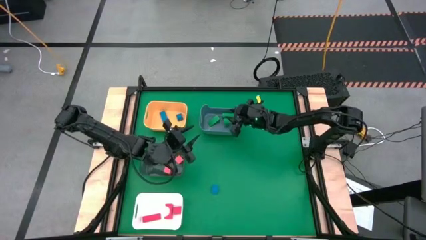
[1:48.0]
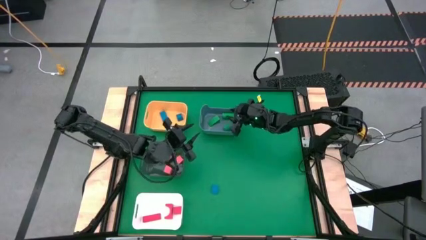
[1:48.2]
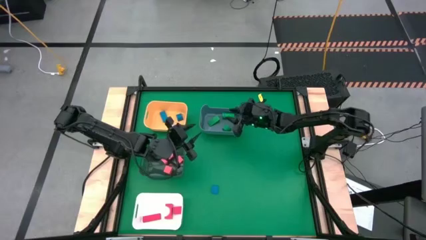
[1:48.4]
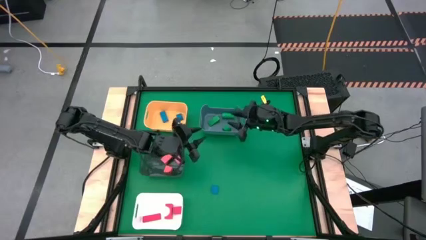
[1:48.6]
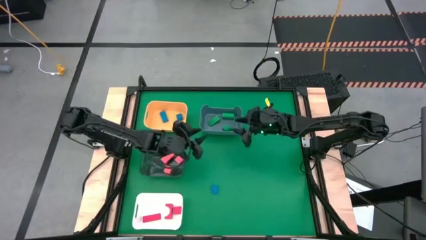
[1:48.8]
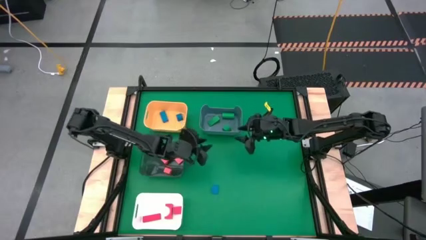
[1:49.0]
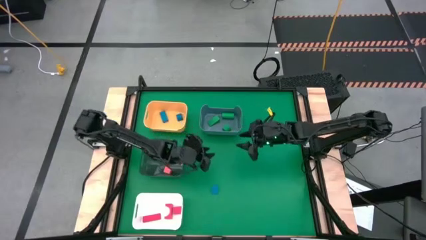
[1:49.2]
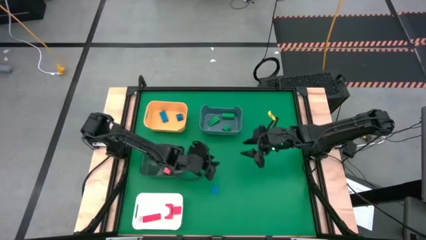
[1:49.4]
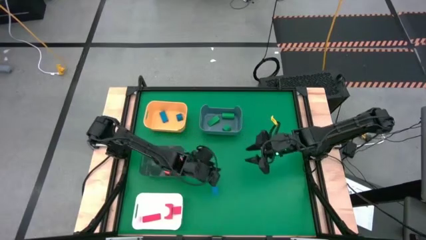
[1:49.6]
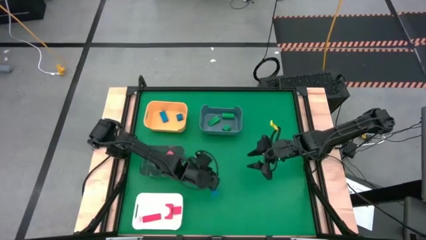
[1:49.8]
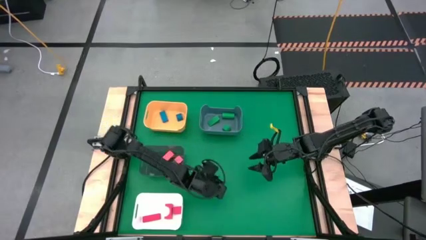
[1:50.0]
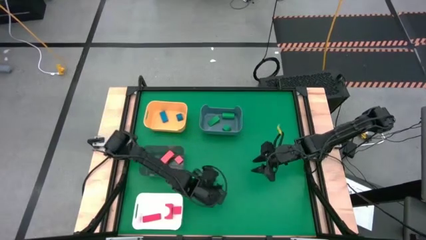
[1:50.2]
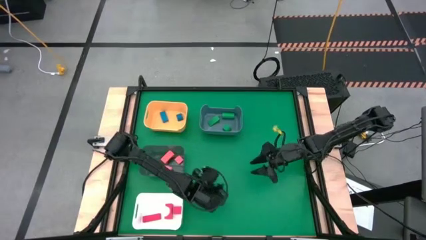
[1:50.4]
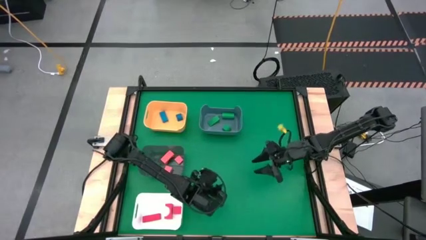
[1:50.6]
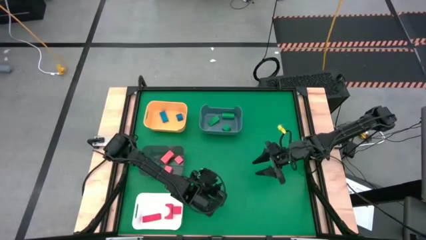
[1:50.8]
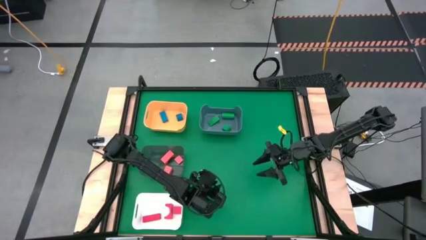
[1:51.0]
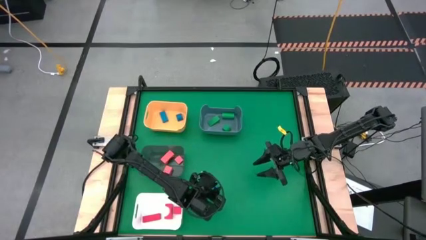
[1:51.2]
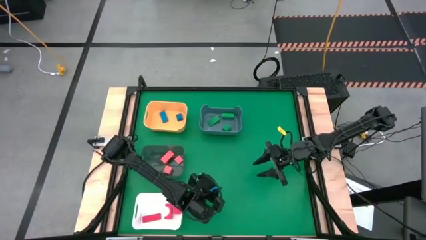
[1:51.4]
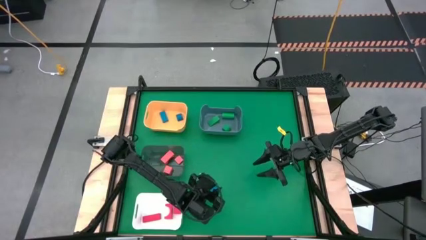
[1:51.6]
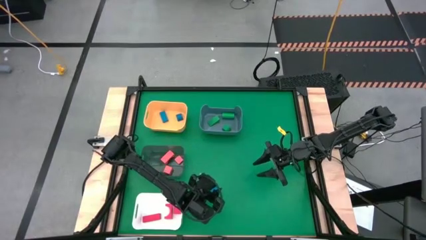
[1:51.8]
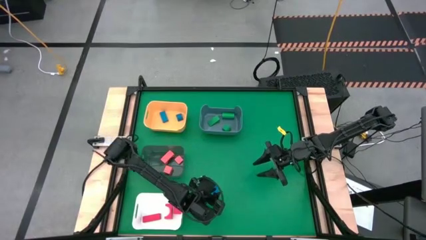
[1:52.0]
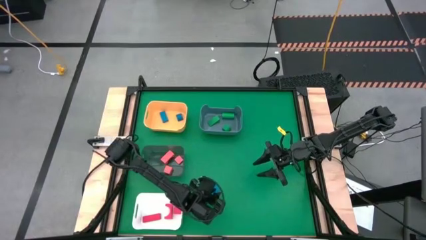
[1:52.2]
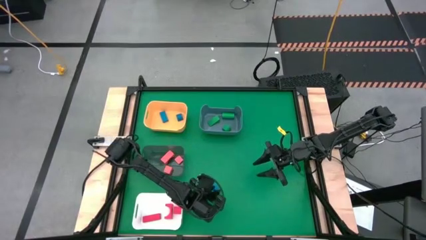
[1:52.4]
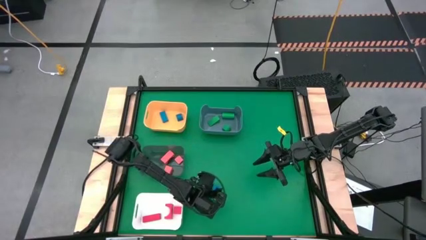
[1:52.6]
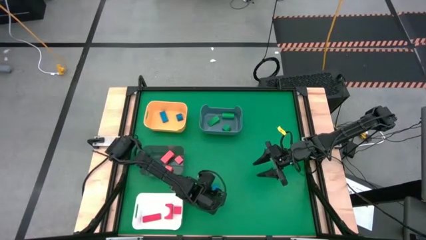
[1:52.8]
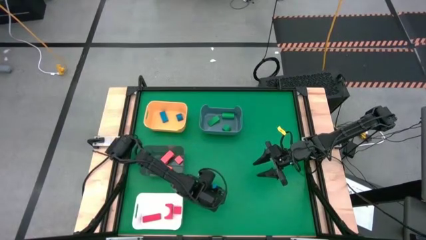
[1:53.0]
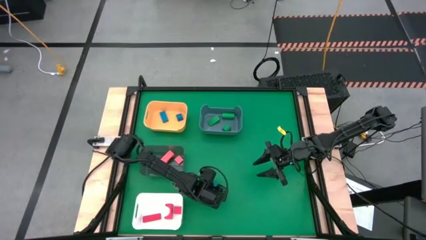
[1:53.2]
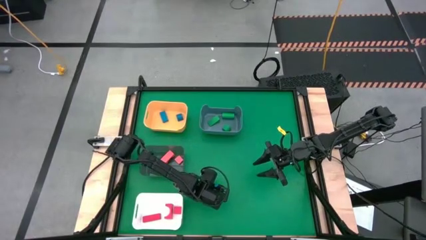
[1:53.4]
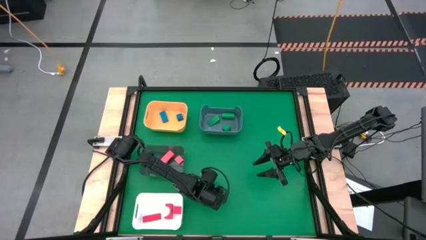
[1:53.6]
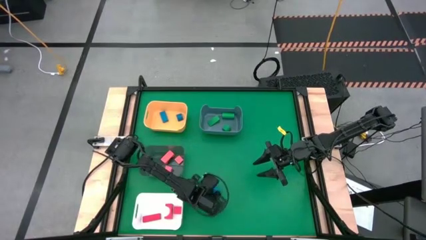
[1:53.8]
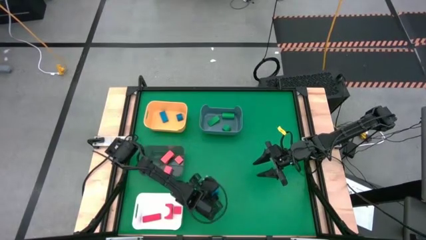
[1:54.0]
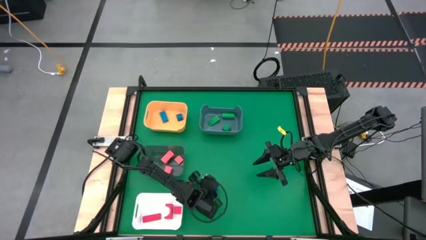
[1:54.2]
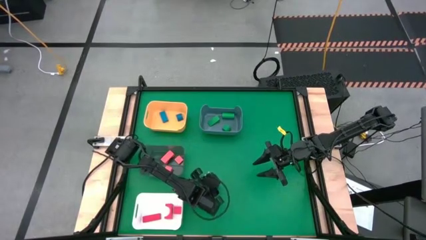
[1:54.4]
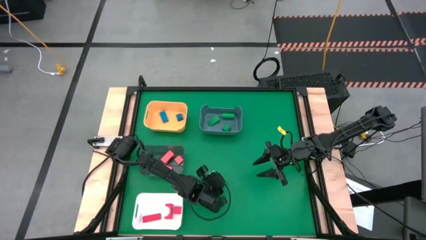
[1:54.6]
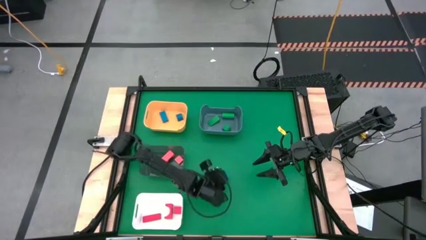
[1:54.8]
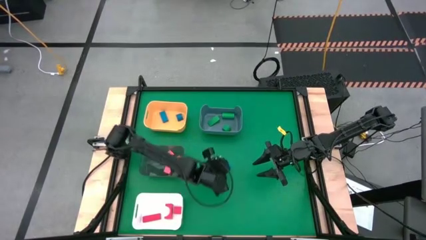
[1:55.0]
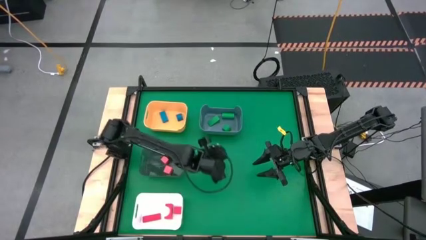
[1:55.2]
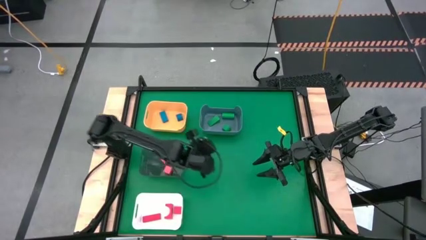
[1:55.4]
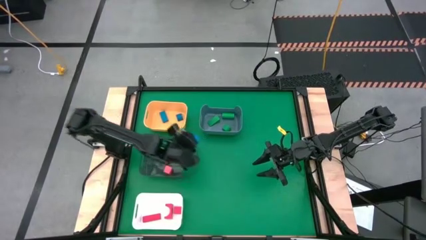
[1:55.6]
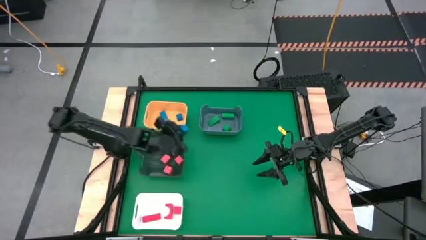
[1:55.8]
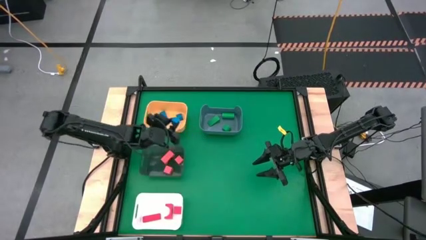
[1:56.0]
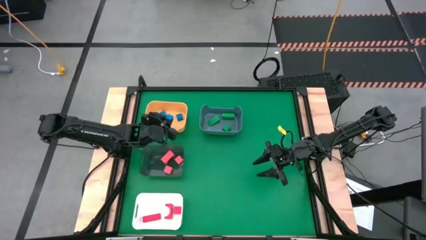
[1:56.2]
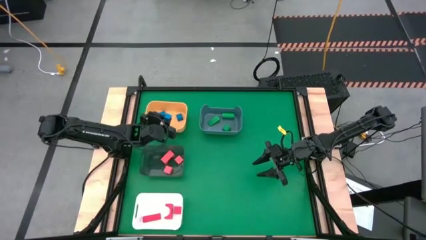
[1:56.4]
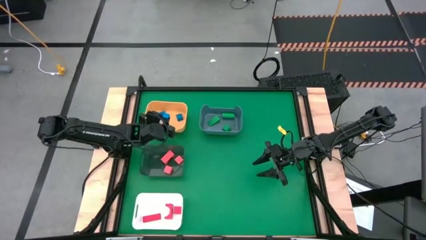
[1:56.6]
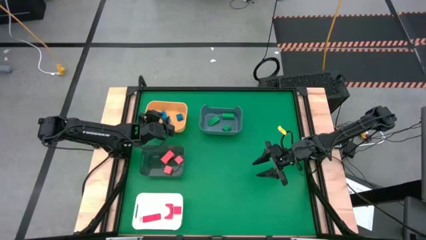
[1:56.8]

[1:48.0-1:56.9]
Task: Sort & place blocks by color
Put the blue triangular block into the yellow bin

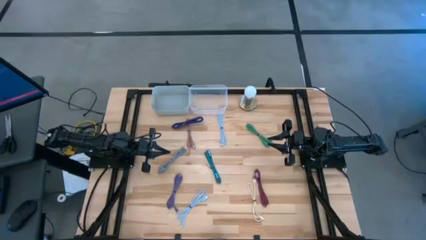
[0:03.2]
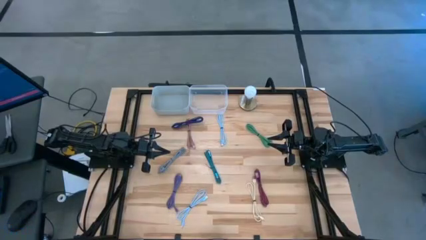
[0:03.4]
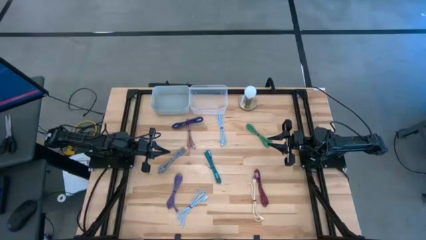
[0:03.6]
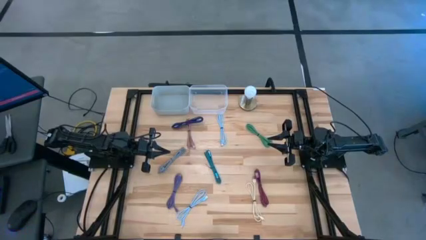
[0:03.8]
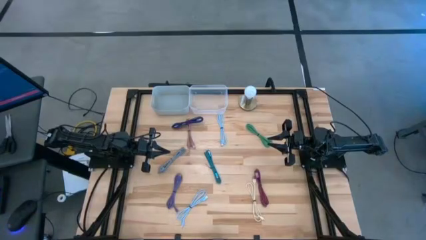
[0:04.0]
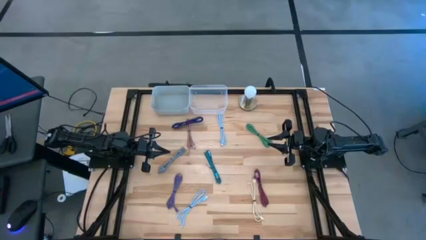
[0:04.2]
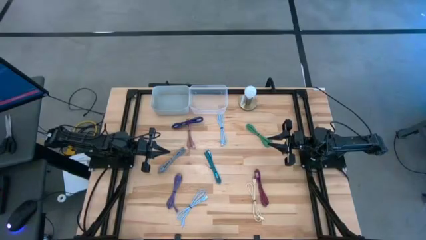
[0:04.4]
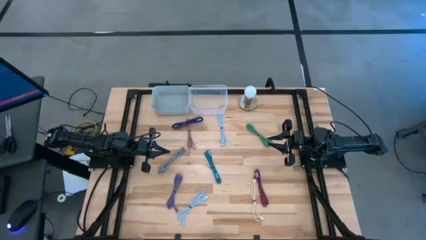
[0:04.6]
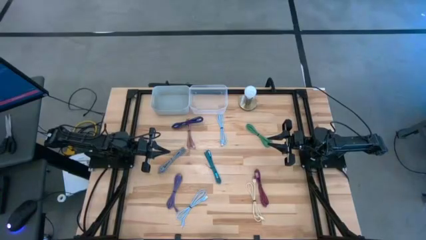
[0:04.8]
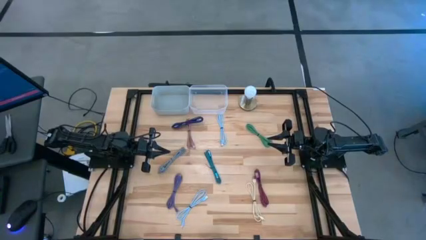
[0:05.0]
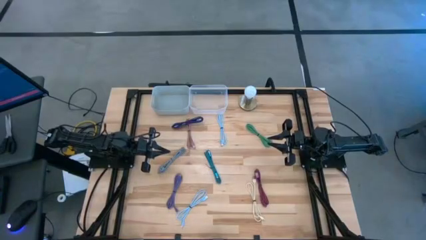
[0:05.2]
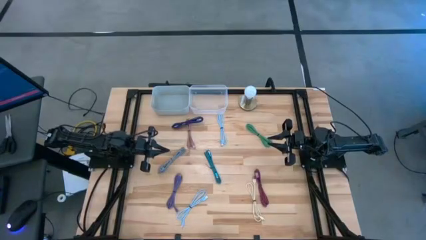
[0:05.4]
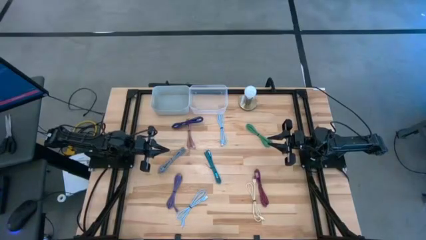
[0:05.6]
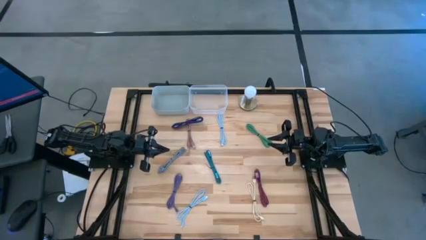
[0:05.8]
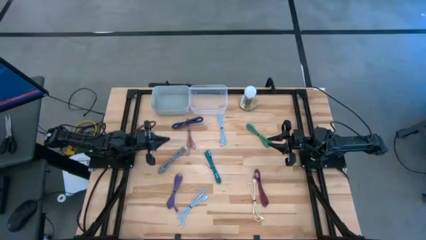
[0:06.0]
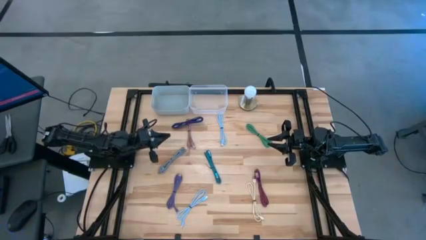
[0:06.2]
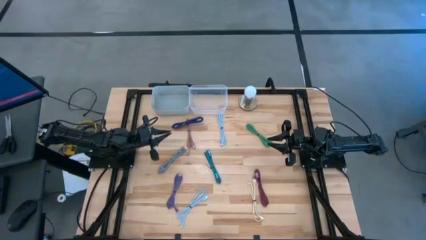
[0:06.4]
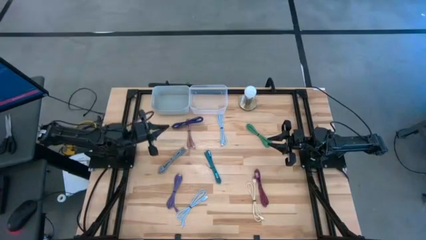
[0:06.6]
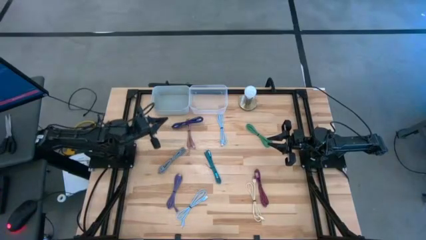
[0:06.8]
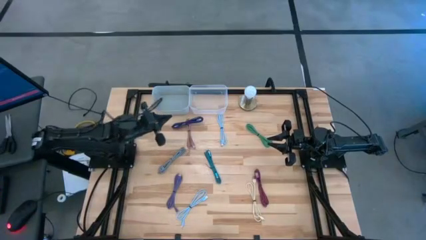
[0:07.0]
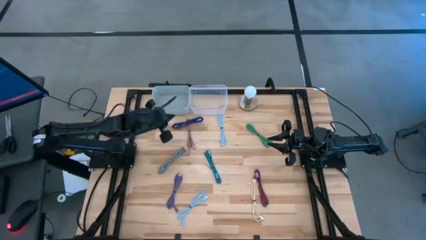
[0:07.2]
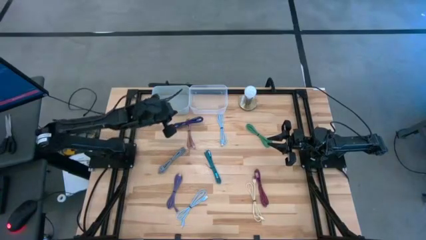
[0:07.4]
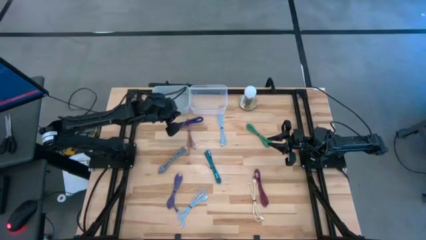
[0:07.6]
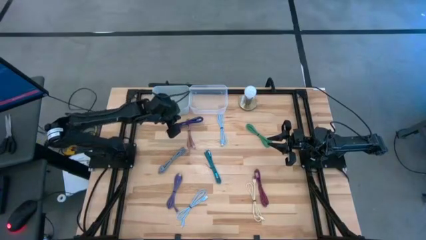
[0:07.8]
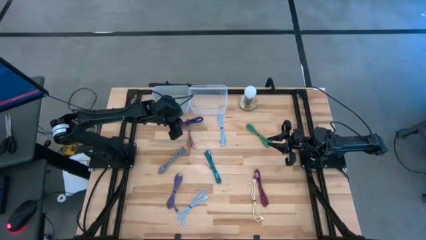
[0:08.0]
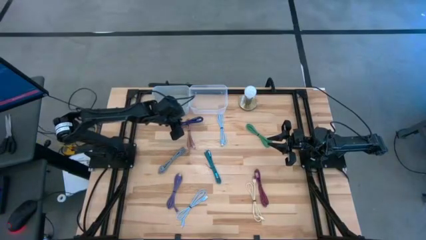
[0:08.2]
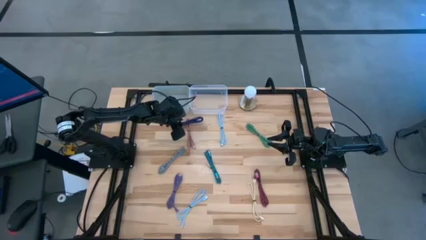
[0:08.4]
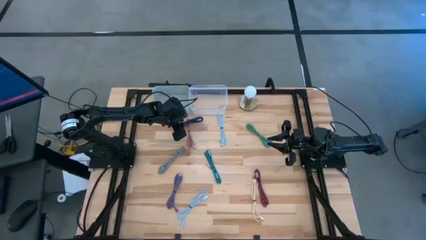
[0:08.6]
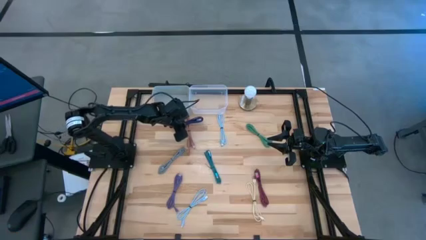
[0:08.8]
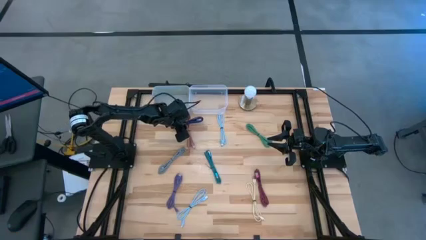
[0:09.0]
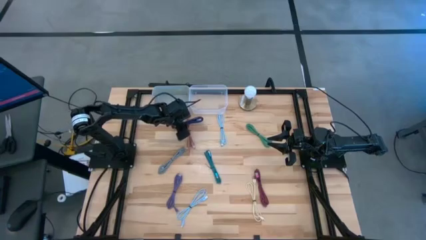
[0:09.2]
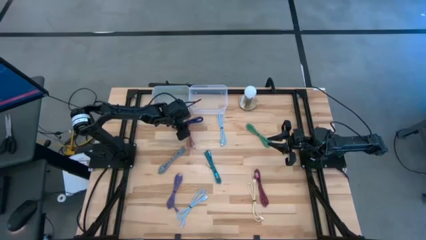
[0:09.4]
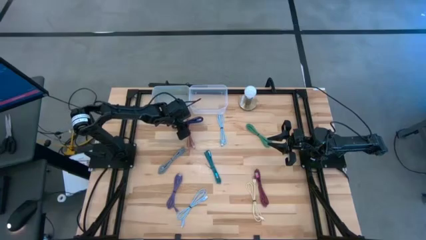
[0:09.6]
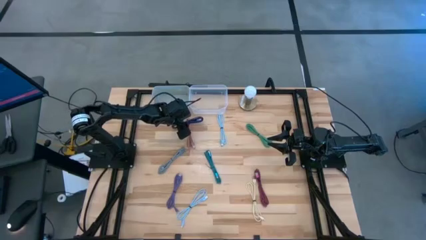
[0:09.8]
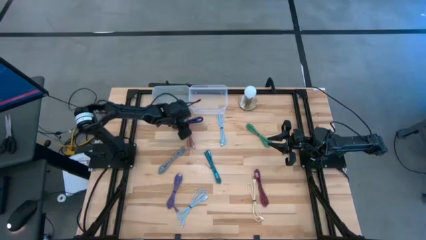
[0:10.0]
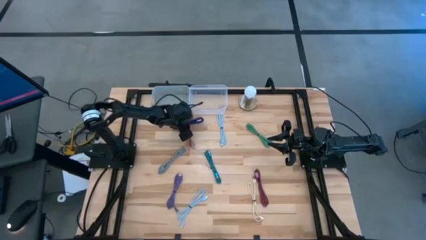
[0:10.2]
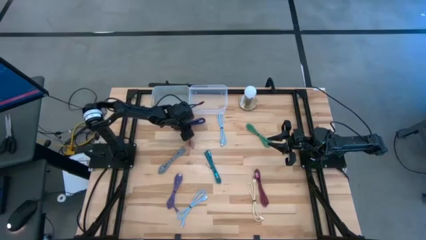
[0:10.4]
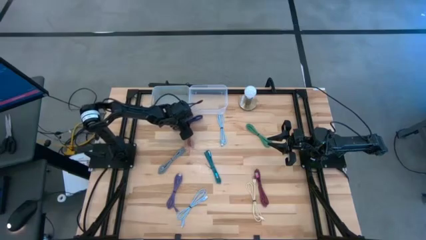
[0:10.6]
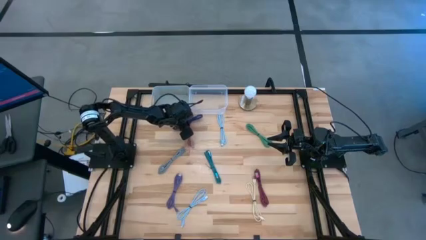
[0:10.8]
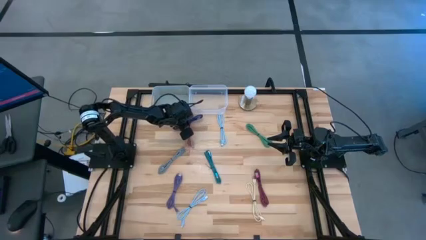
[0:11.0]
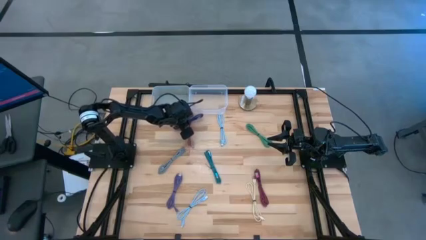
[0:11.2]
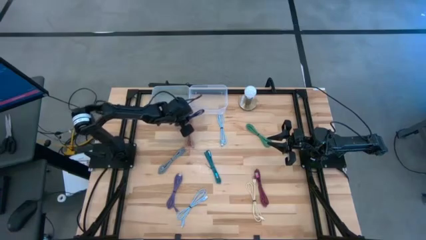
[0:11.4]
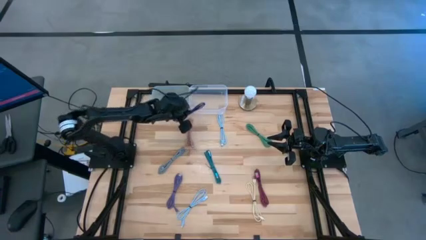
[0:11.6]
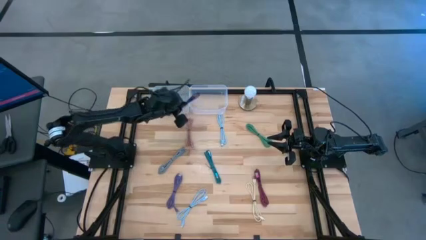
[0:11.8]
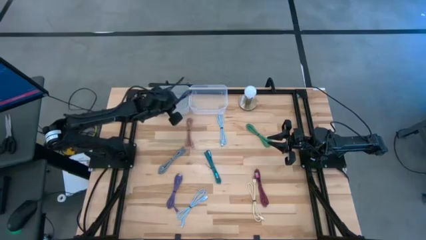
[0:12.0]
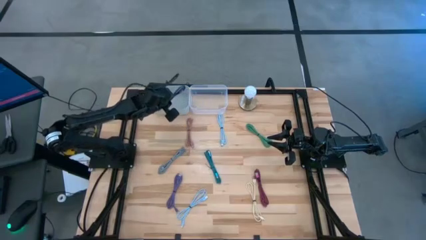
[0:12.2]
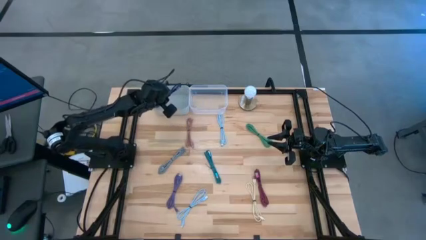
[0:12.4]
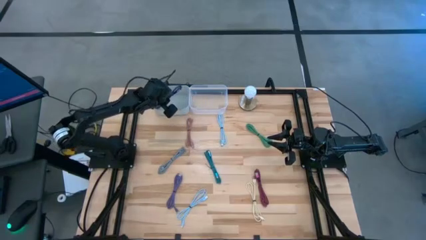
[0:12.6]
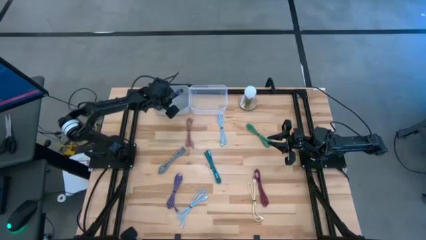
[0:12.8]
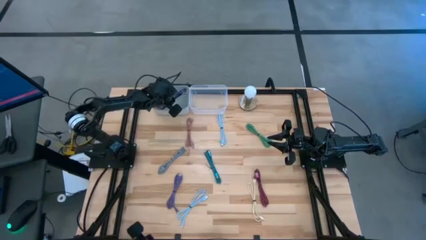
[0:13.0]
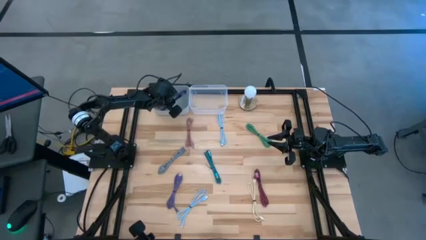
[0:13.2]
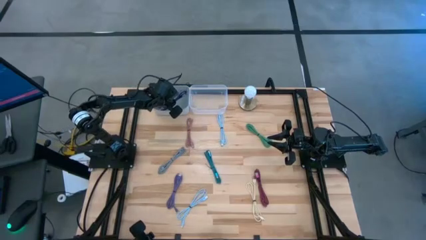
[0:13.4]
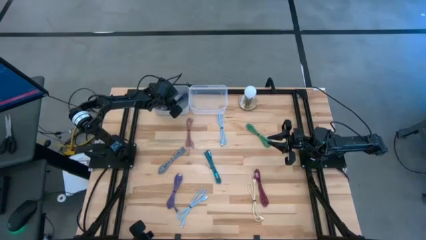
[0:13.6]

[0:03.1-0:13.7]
Task: Pick & Place USB Port
Put the violet and white USB cable into the gray bin
